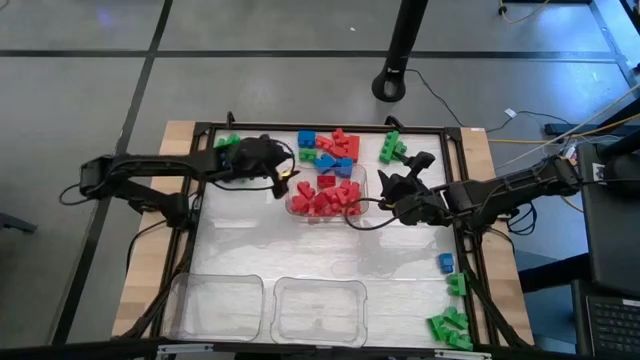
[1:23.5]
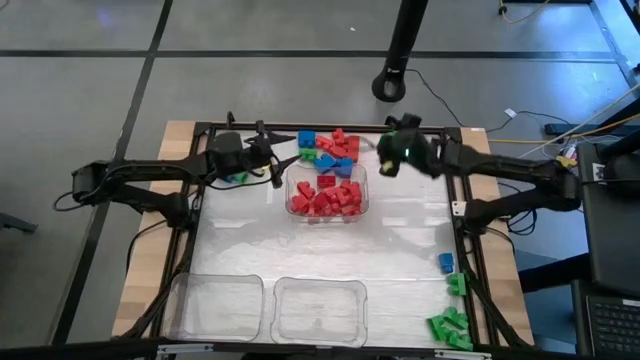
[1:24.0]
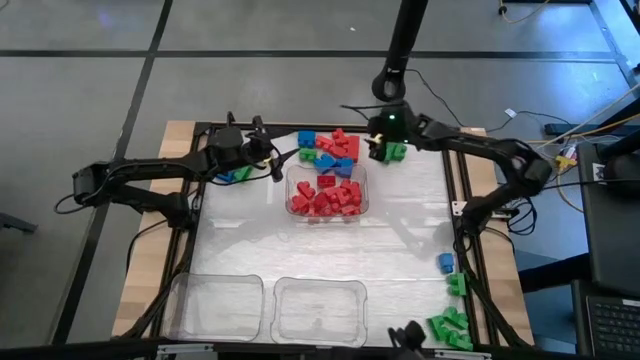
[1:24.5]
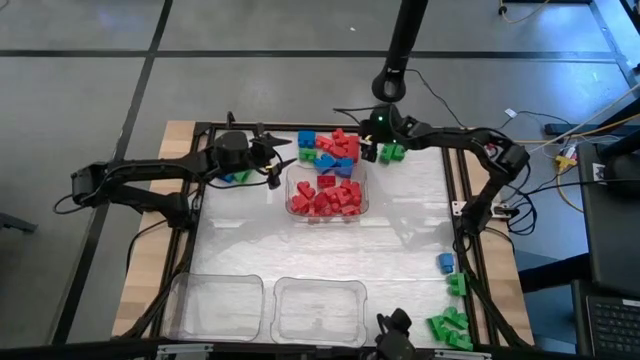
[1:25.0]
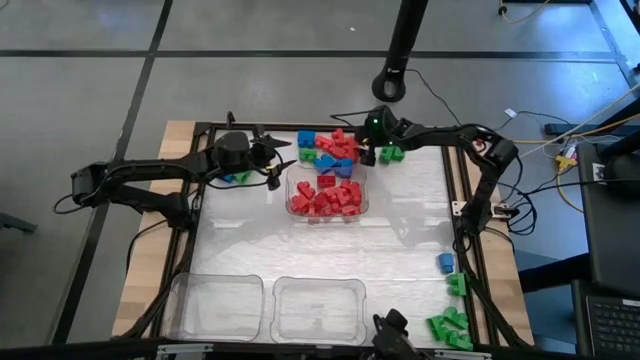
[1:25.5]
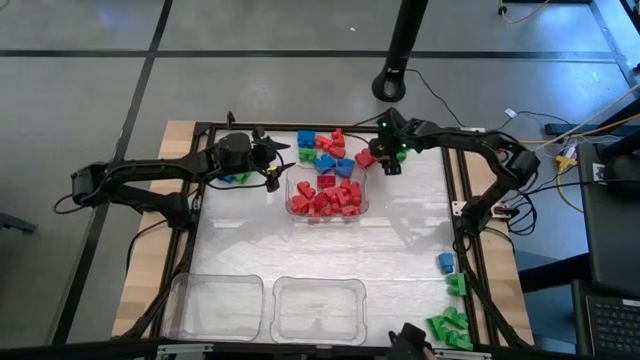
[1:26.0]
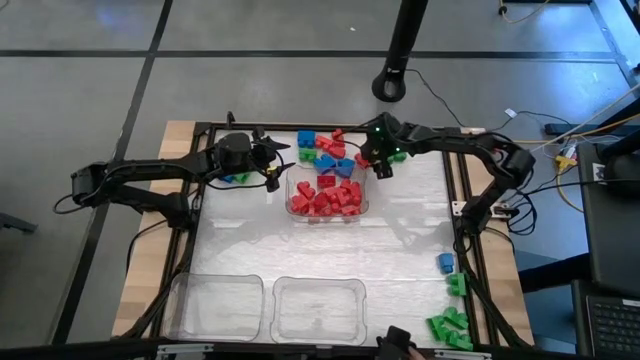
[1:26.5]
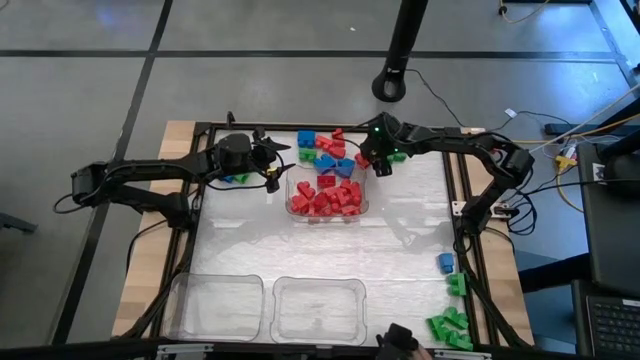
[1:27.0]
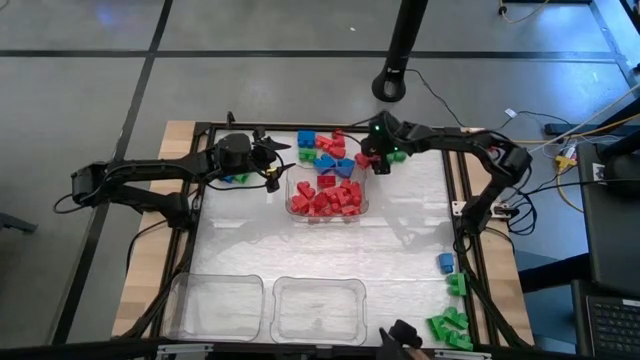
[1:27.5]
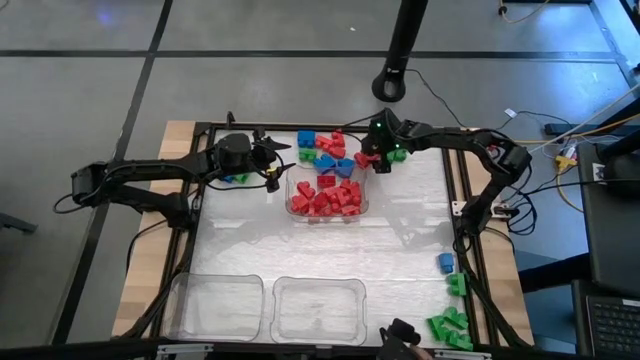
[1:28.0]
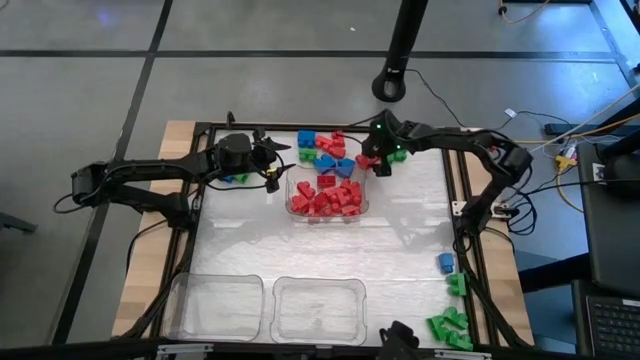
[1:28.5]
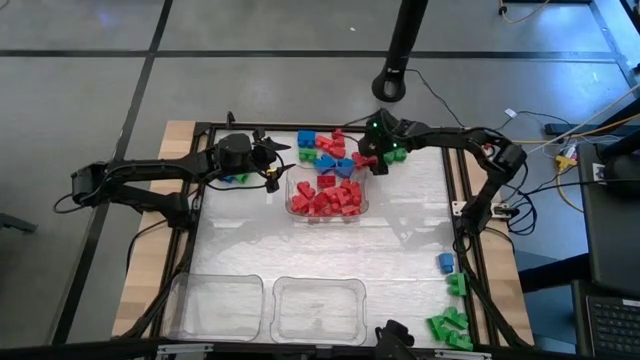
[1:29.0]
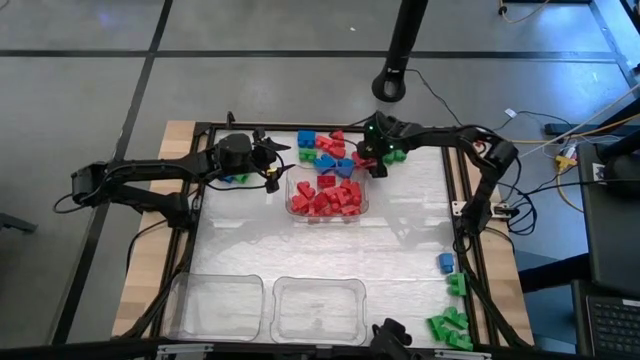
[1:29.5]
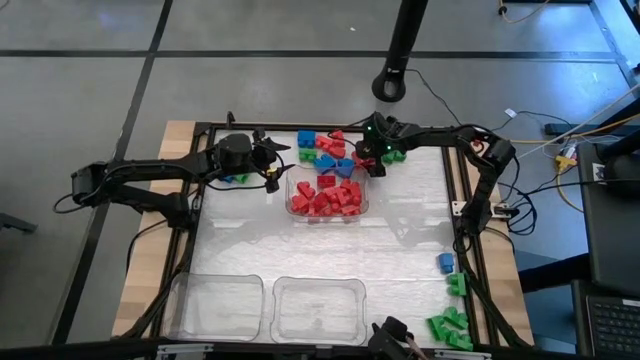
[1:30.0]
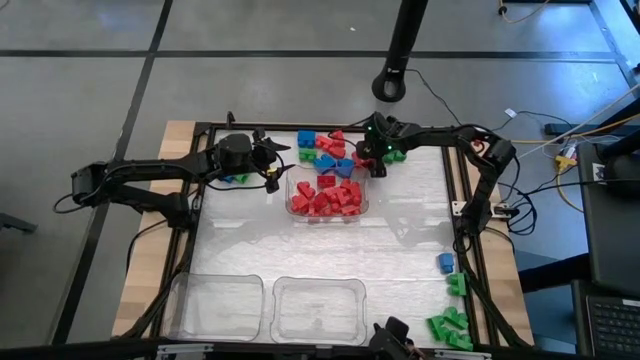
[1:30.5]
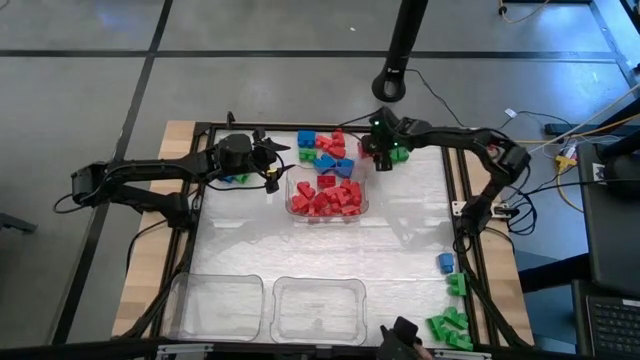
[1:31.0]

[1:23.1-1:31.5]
Task: Sort blocks
Put the red game piece into the top right transparent bin

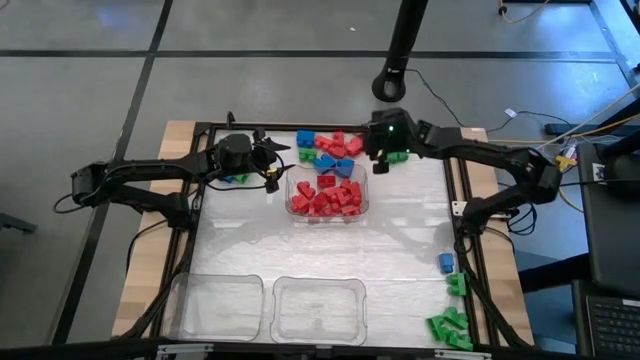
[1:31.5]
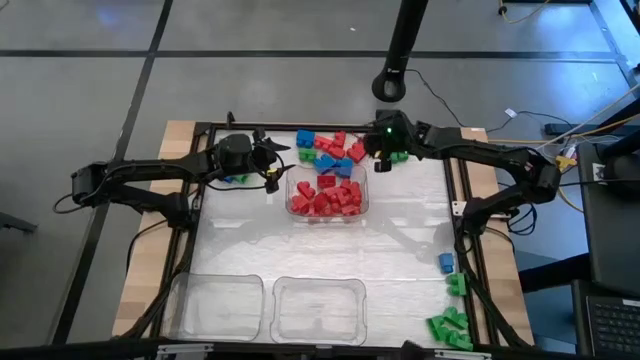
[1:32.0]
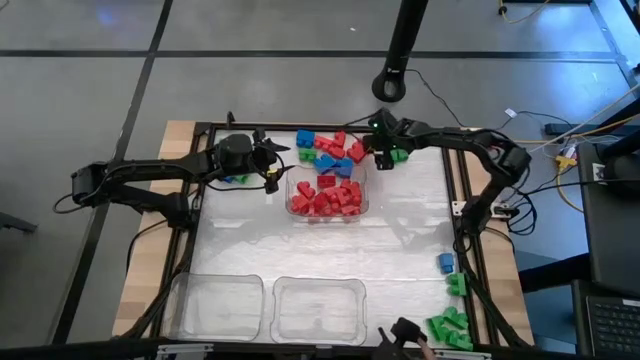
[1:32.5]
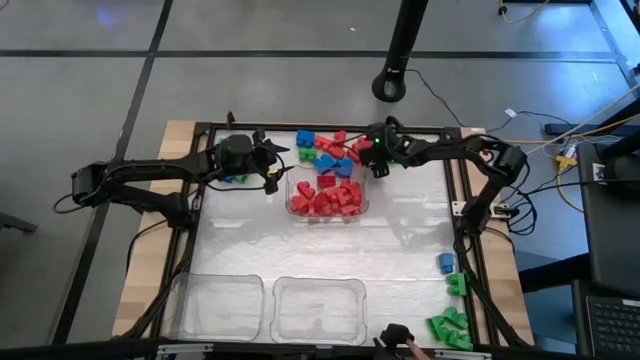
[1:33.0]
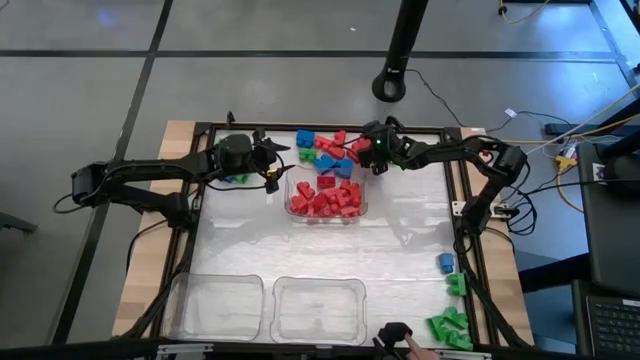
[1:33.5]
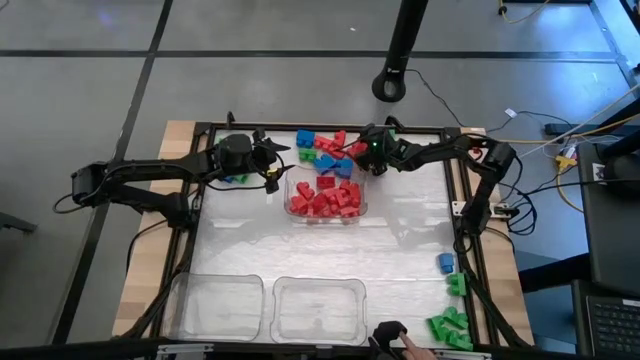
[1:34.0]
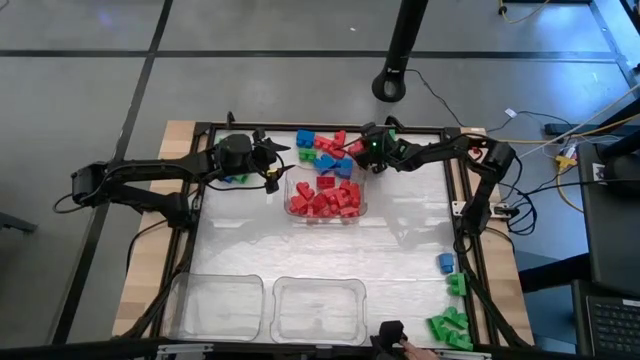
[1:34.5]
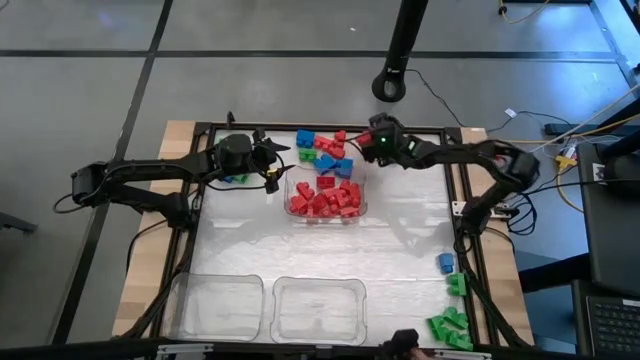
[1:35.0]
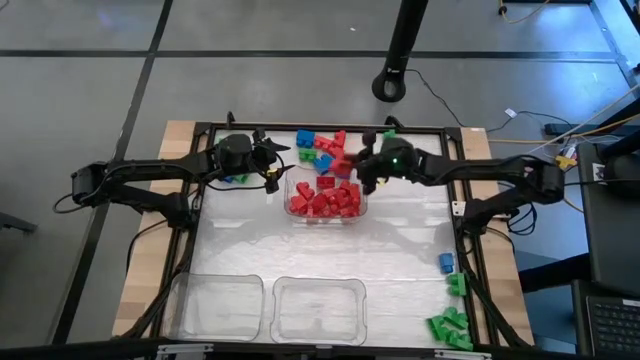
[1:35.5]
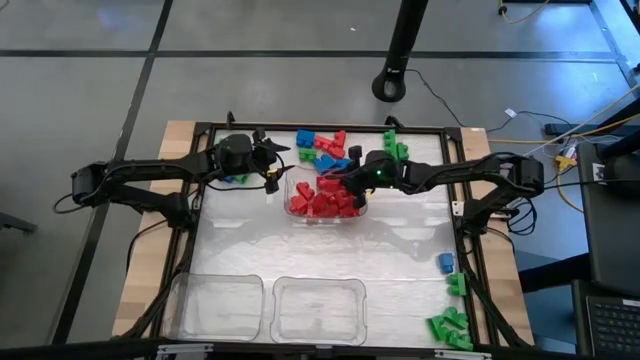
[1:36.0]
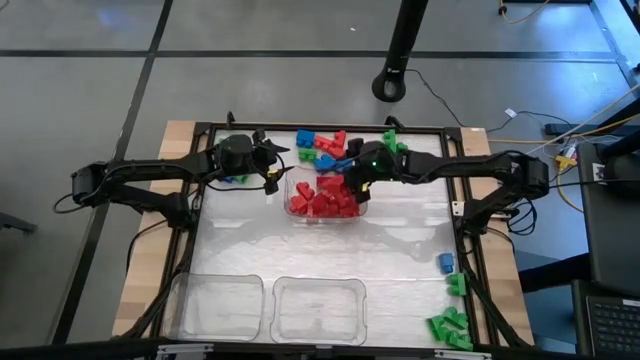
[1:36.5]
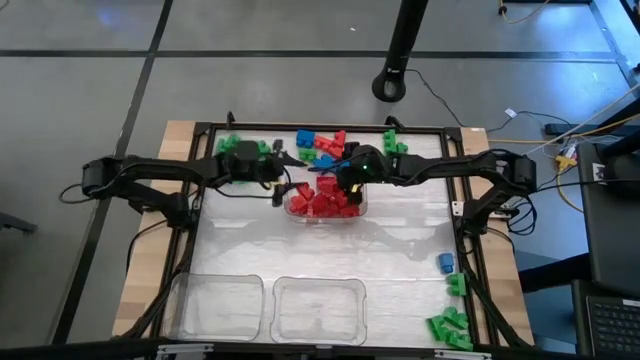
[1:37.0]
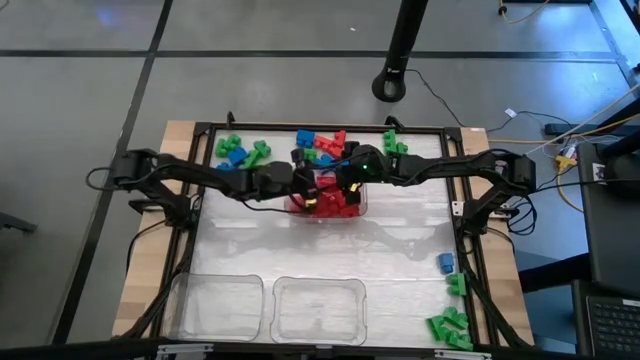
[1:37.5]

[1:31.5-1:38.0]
Put the red game piece into the top right transparent bin

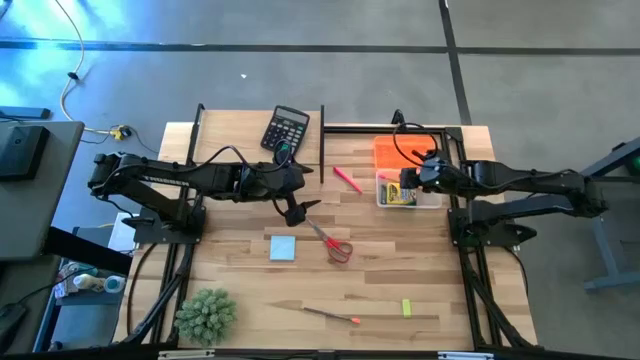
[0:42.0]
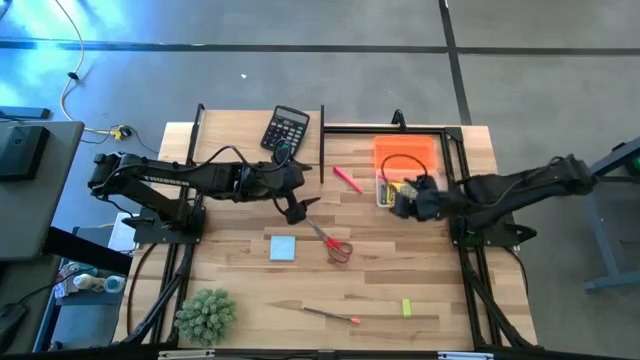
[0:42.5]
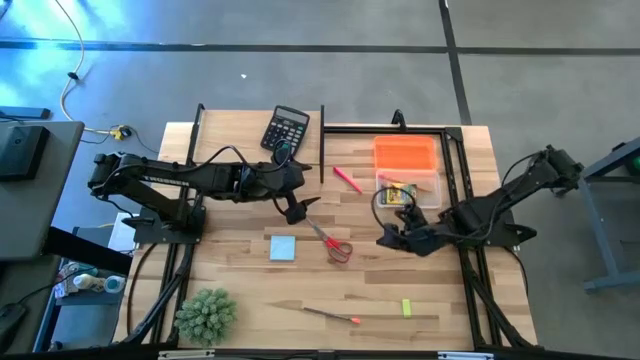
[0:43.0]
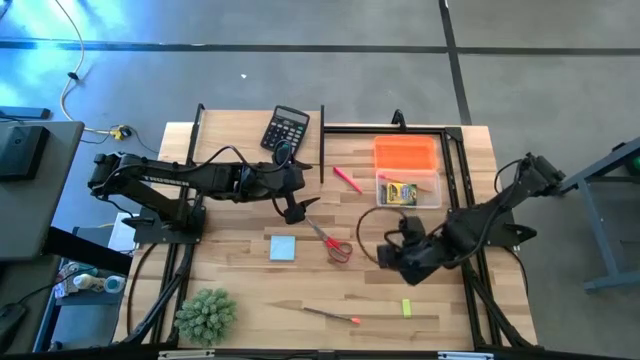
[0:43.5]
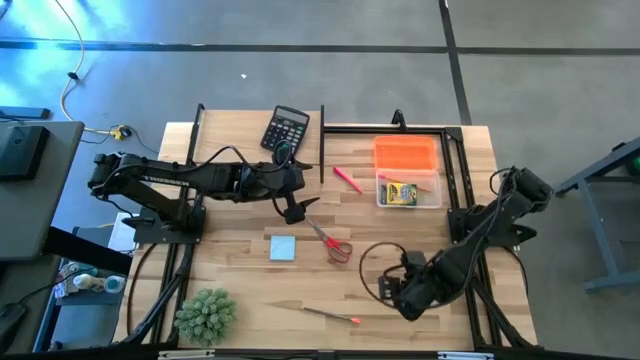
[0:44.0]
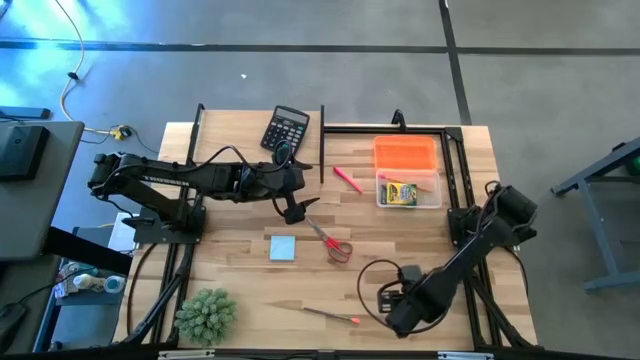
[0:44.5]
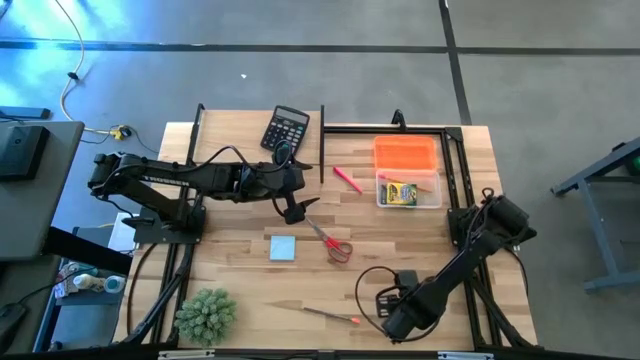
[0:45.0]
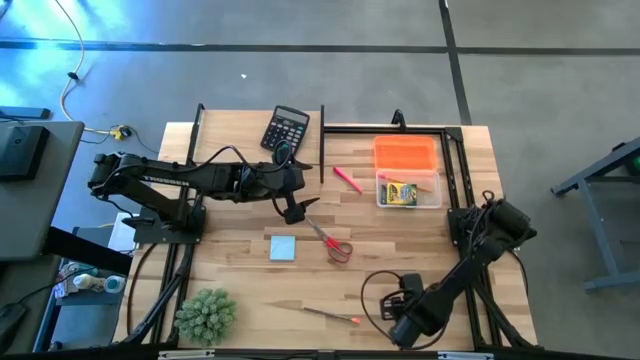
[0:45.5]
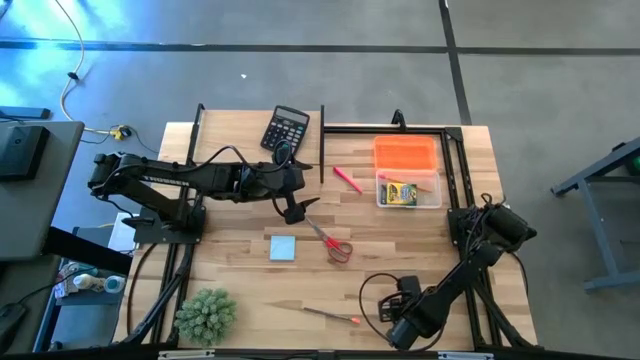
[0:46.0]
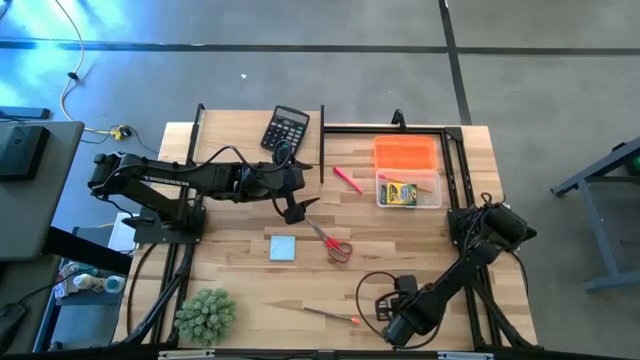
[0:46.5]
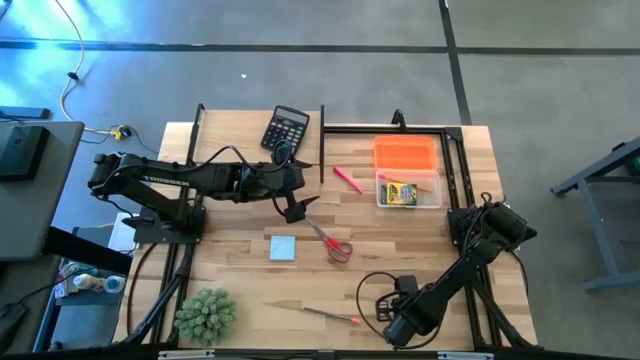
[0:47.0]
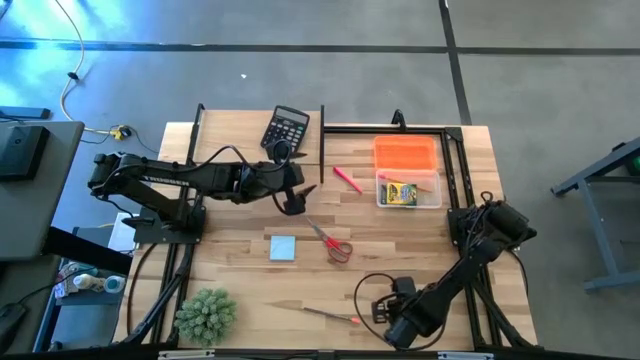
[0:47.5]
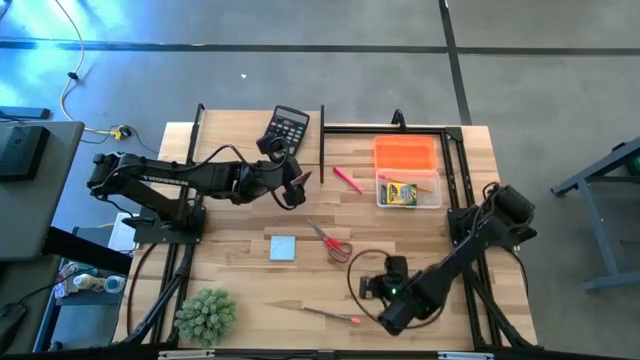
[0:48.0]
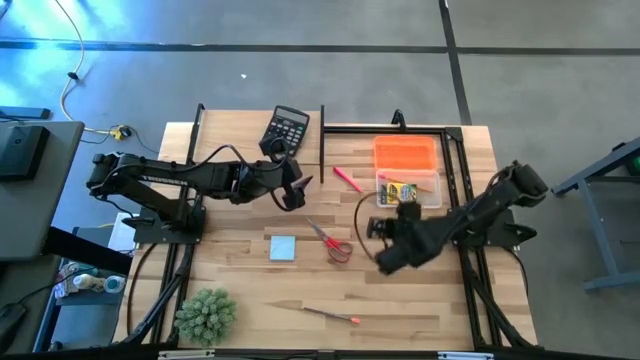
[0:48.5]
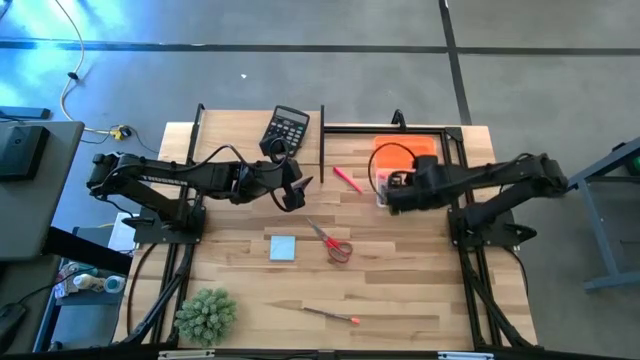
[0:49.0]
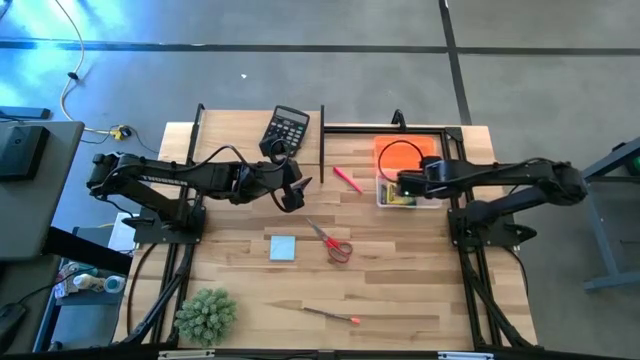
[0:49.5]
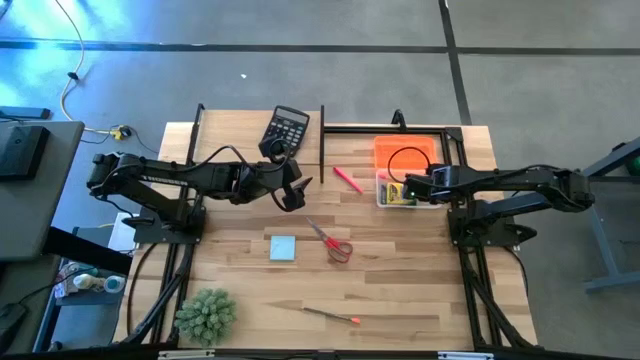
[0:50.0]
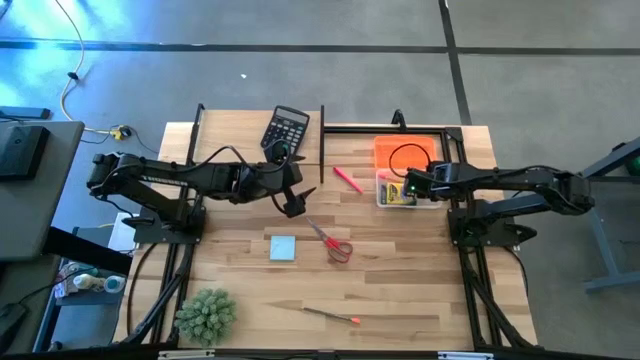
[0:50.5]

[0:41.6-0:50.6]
Task: Pack school essentials
Put the light green eraser into the orange supply box
